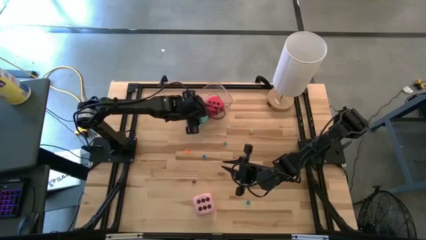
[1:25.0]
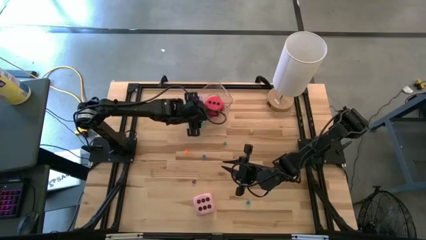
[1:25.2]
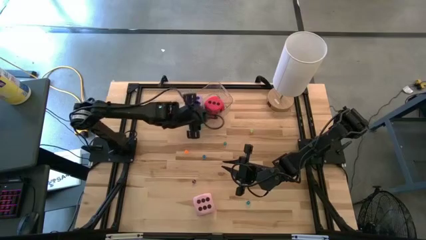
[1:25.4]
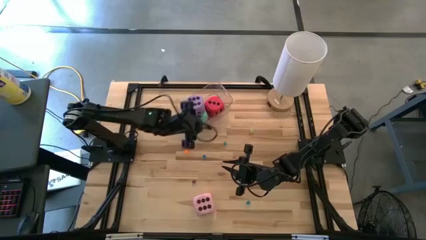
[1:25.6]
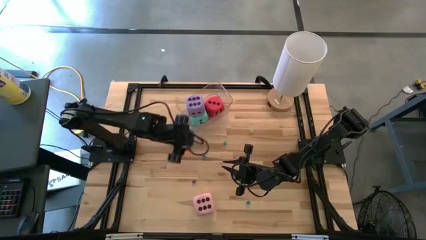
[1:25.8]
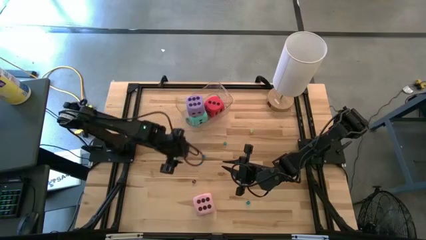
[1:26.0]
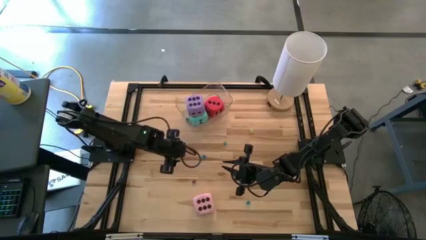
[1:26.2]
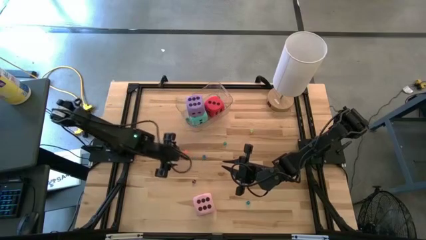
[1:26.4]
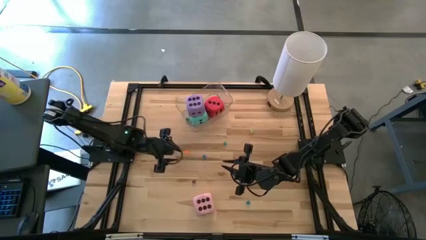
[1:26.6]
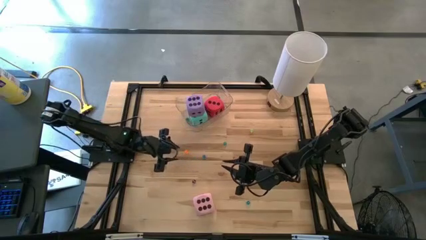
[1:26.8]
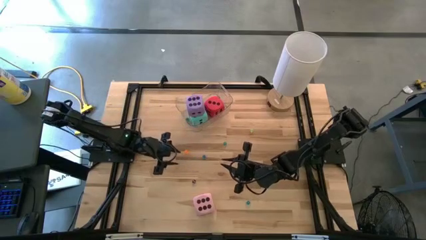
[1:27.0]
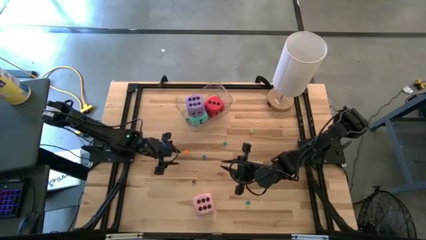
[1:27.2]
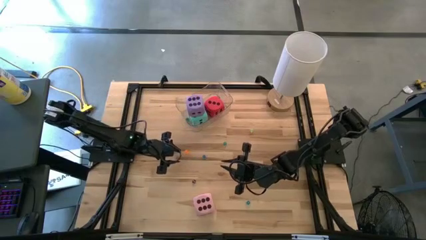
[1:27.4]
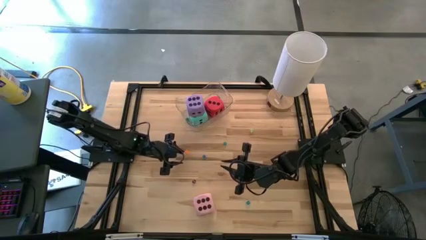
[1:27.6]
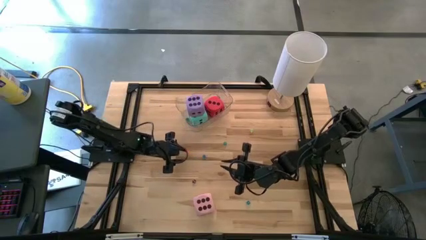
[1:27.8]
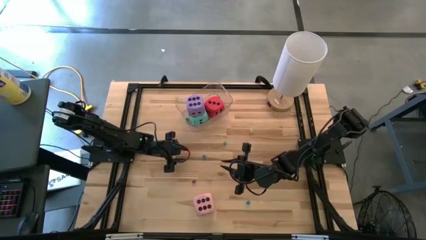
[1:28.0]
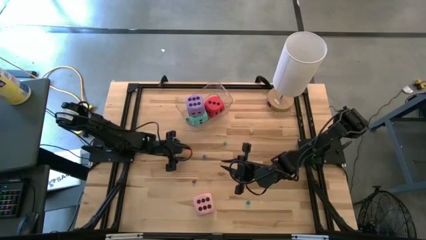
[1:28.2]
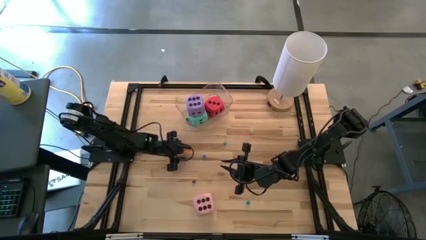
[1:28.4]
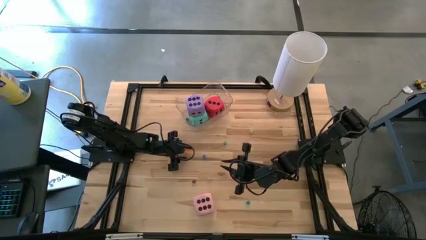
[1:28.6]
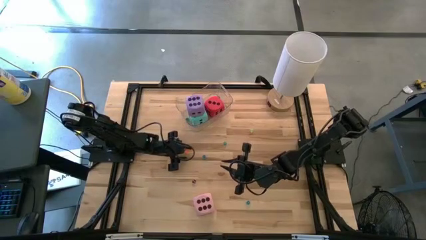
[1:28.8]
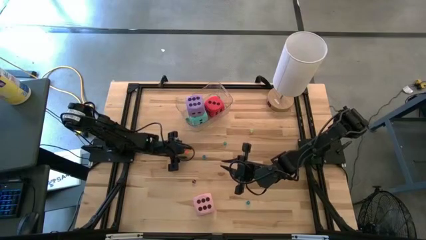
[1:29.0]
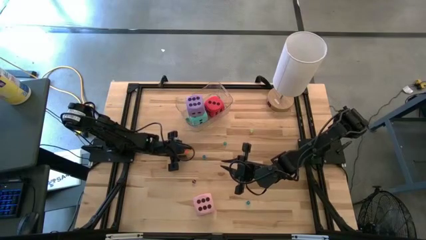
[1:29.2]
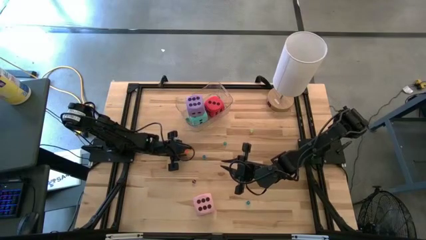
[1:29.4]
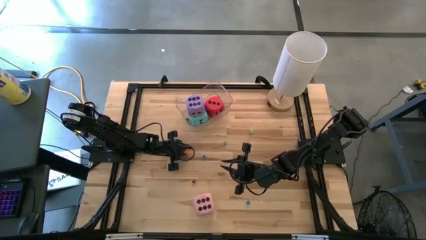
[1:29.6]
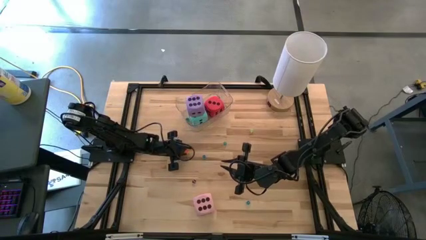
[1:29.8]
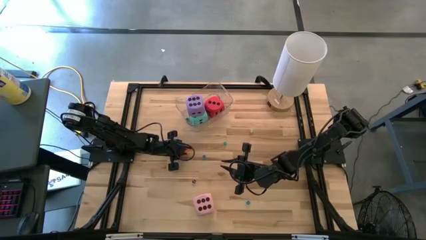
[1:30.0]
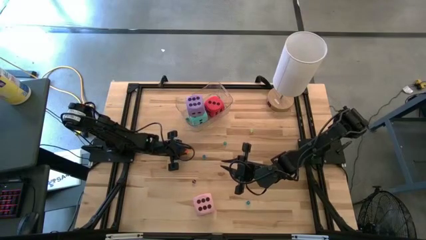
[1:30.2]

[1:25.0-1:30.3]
Task: Pick & Place Dice
Put the small orange dice in the transparent bin

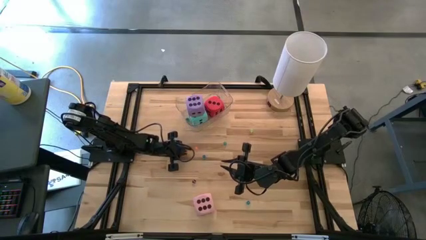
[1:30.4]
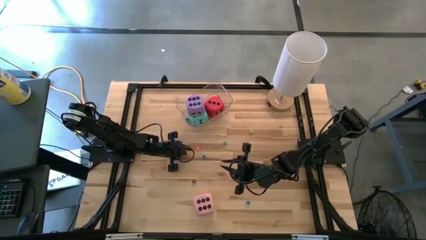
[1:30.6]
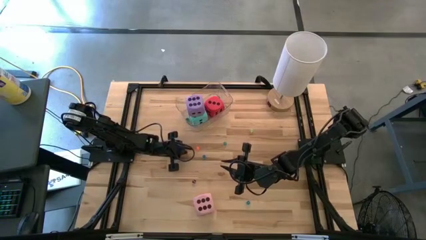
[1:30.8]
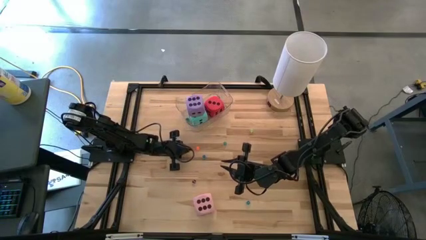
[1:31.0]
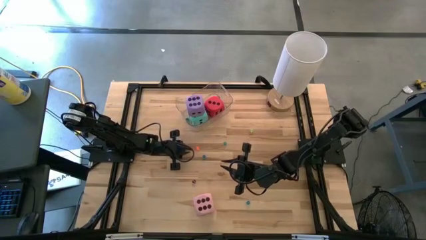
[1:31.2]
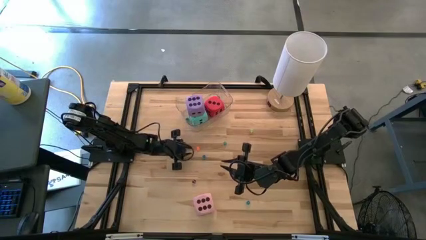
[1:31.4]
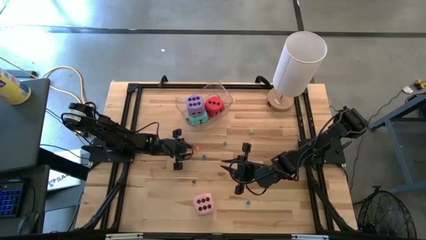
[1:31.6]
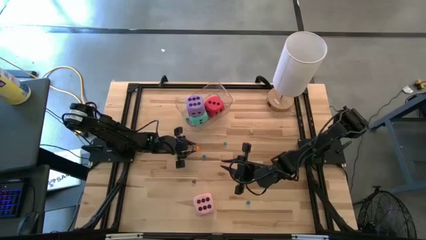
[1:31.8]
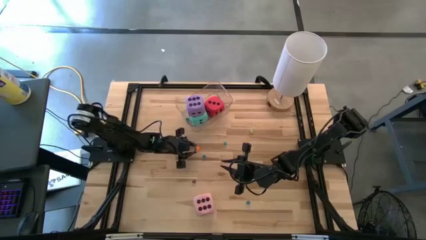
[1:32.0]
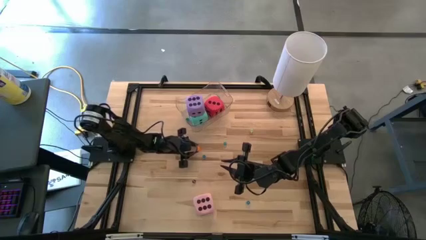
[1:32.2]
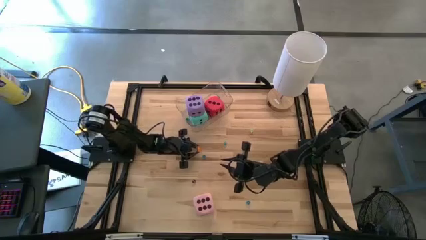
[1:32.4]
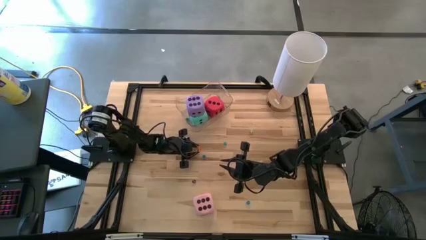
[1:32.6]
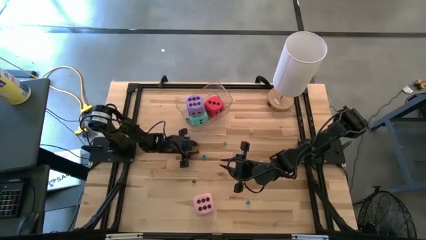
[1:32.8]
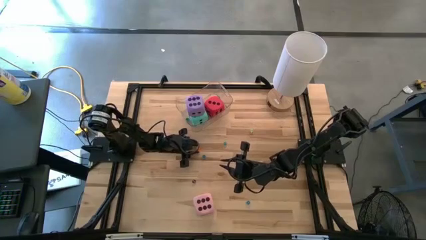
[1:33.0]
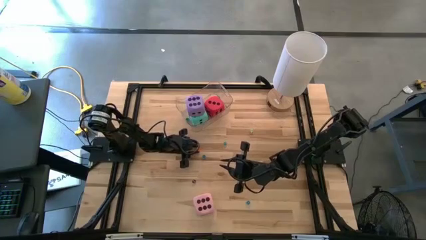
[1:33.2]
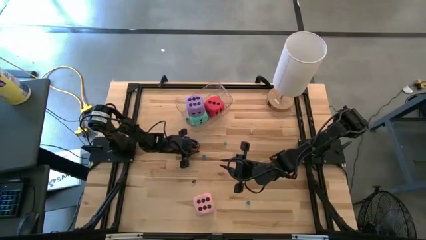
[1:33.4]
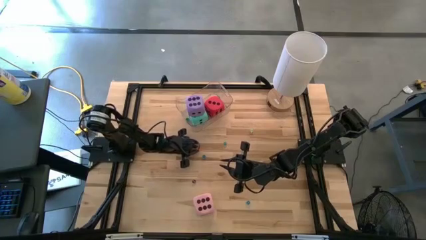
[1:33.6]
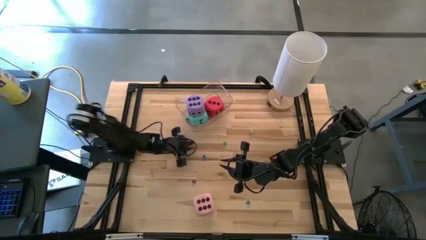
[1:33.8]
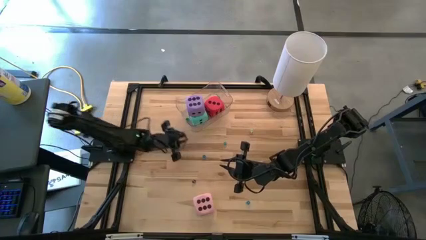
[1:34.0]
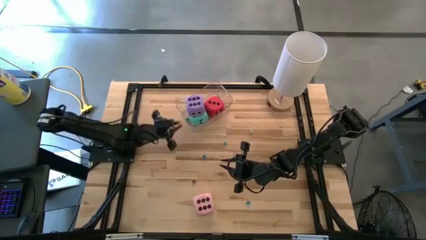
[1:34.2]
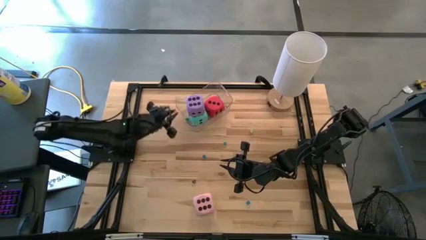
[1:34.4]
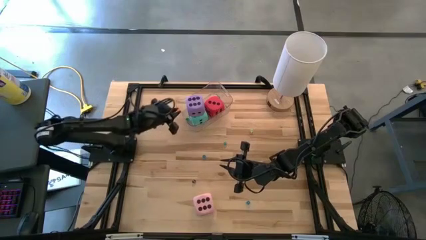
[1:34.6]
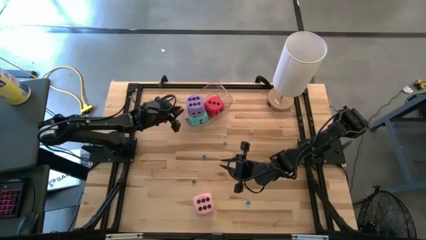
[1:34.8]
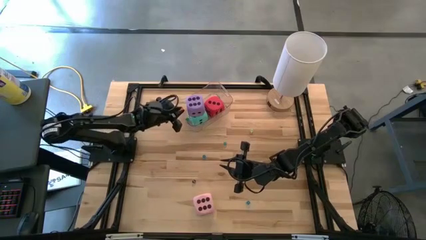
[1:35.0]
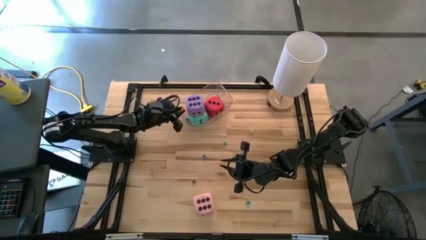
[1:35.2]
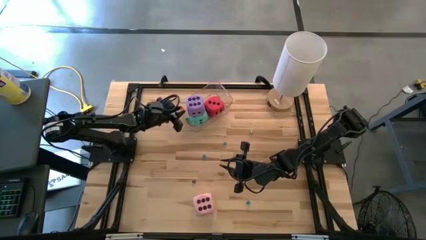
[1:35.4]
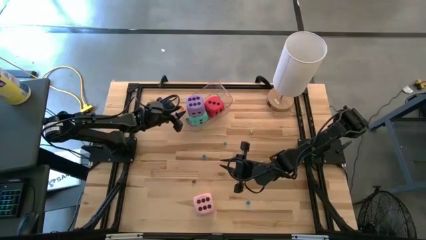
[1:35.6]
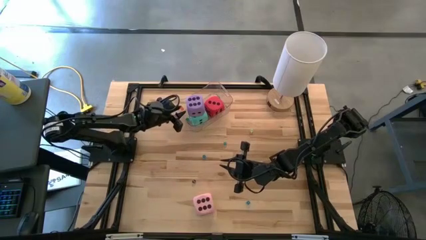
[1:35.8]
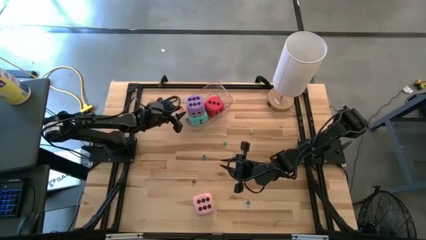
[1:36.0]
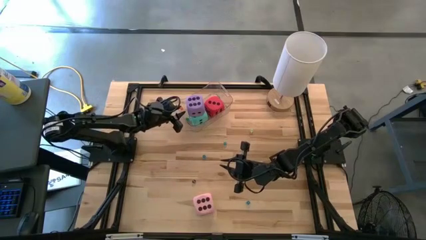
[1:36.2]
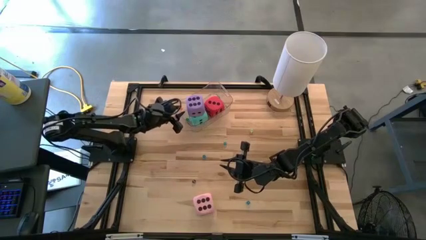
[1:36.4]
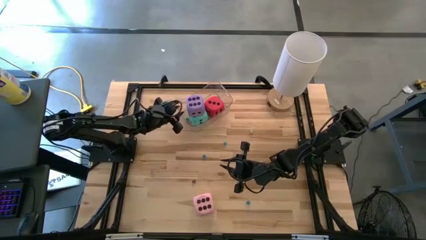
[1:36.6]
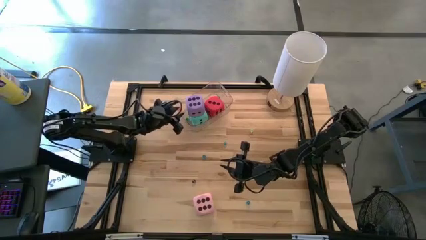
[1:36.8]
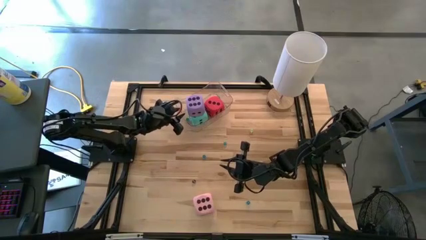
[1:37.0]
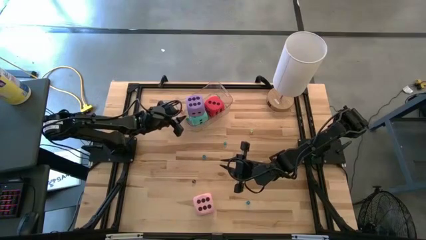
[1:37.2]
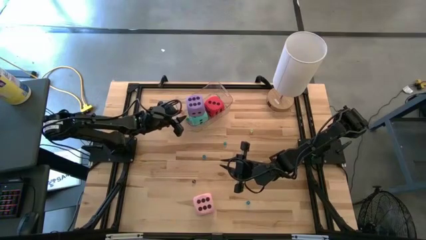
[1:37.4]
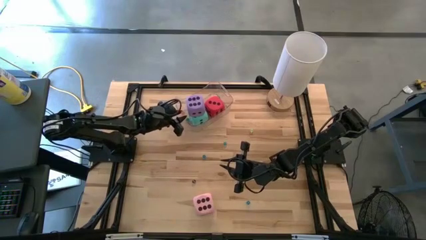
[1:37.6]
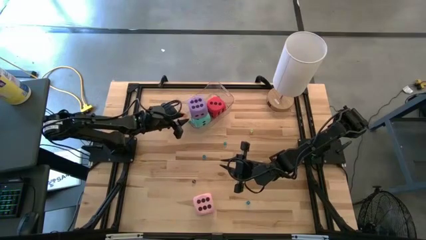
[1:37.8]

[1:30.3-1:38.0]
Put the small orange dice in the transparent bin

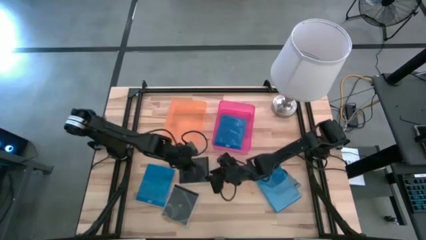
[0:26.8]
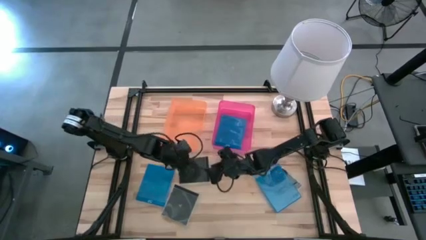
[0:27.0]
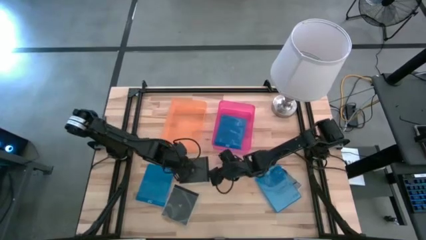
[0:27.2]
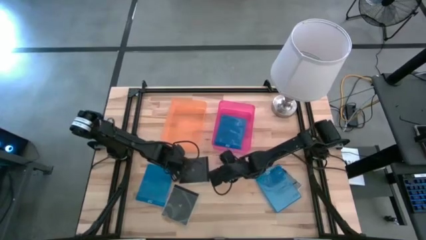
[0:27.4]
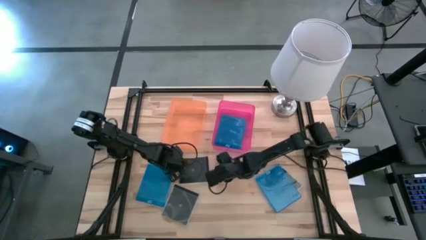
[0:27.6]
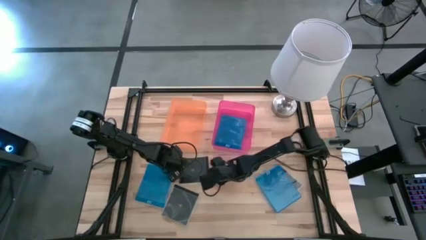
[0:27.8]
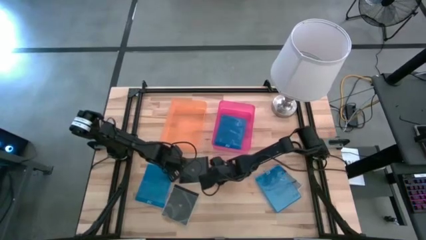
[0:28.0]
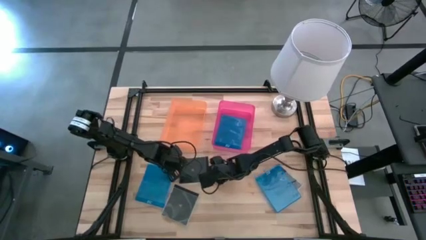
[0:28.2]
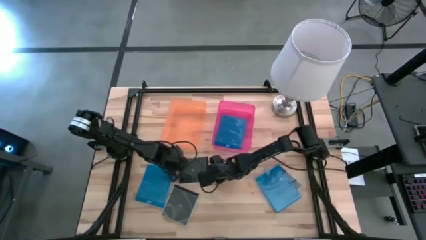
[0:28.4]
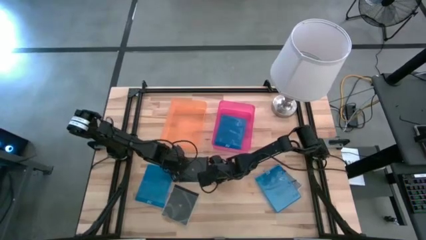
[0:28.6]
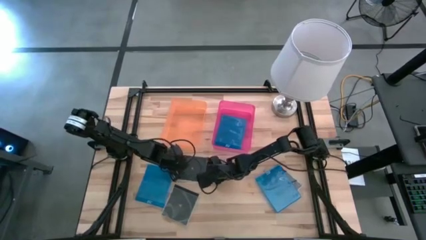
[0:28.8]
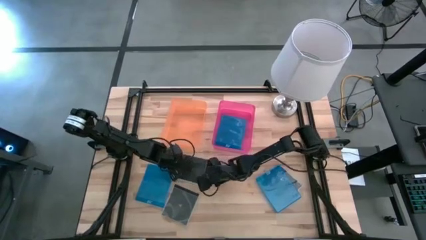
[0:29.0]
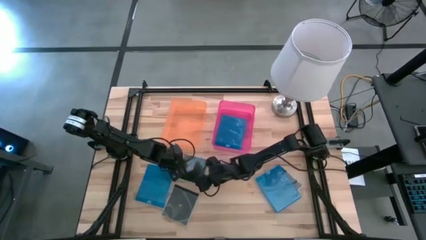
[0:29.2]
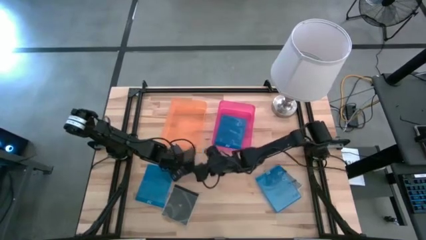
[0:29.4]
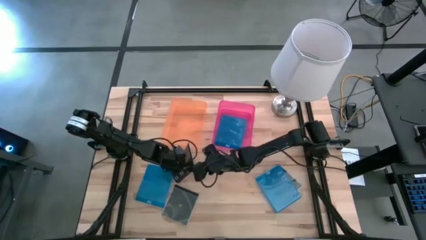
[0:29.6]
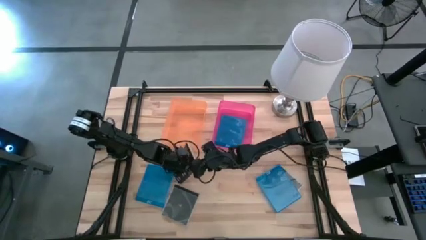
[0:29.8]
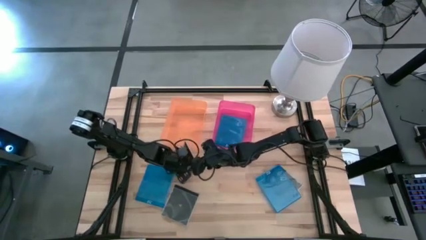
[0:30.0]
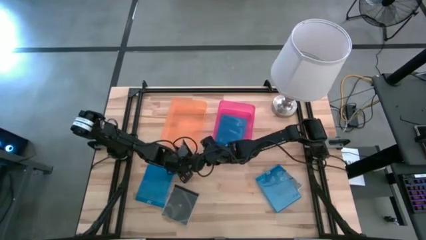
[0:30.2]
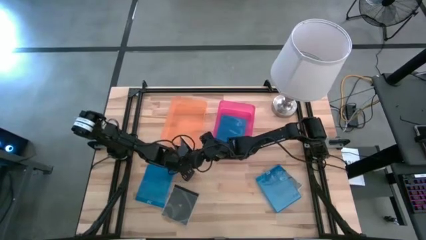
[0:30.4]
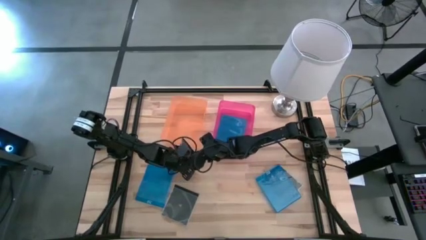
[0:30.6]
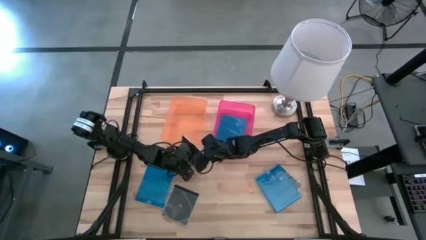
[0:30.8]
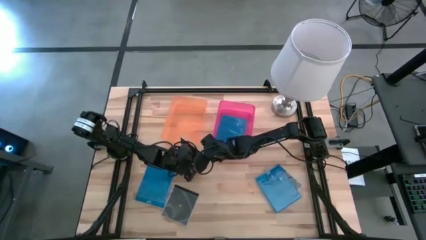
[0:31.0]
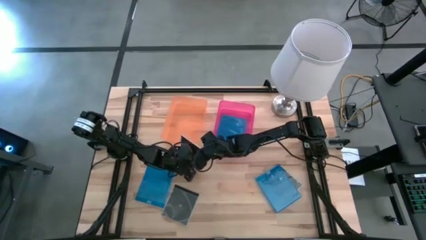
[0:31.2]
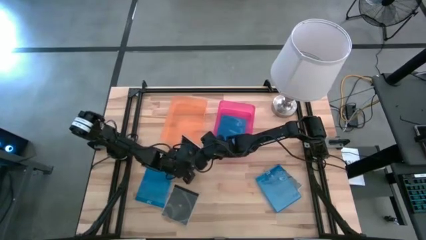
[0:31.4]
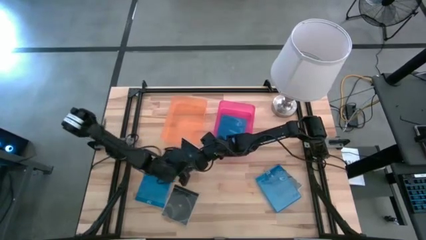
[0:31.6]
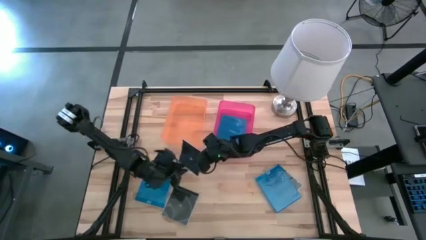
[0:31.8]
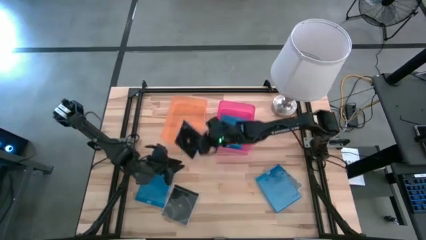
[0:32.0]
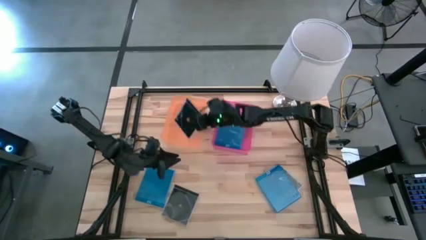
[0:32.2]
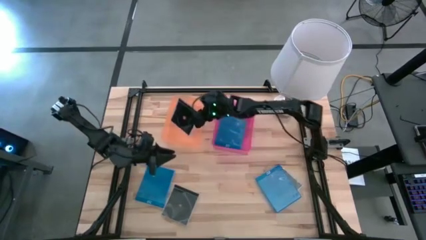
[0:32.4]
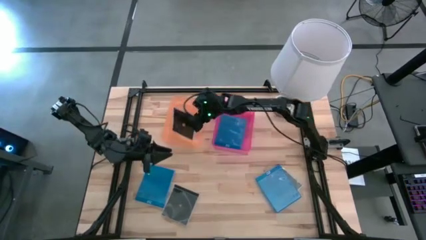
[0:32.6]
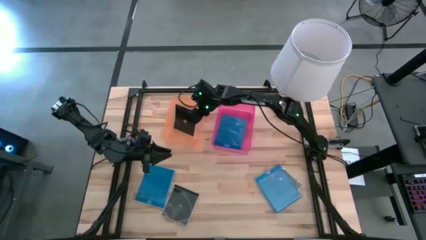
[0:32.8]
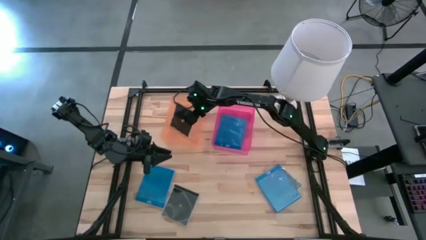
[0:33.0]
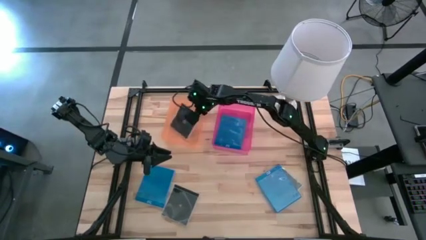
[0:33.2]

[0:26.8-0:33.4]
Task: Pick & place jewel cases by type
Put the middle black CD case into the orange bin
